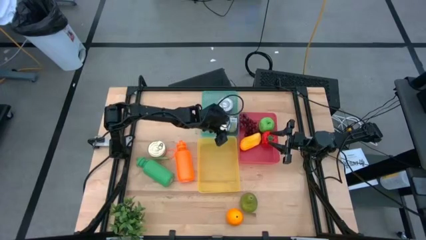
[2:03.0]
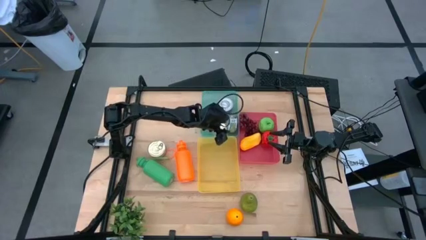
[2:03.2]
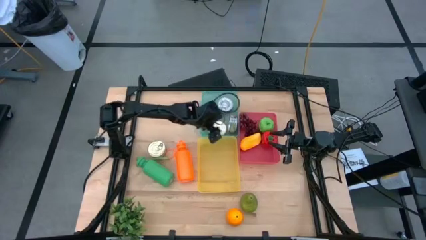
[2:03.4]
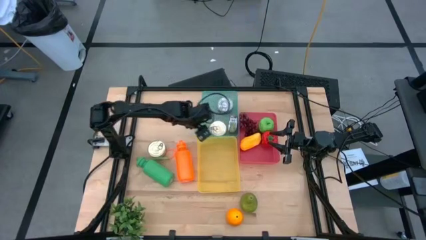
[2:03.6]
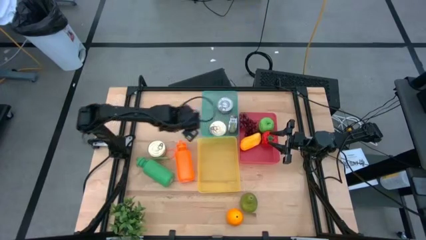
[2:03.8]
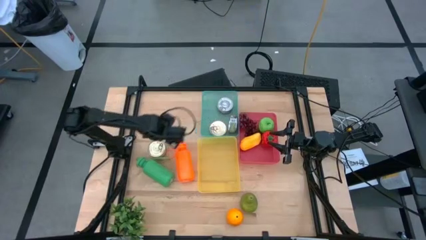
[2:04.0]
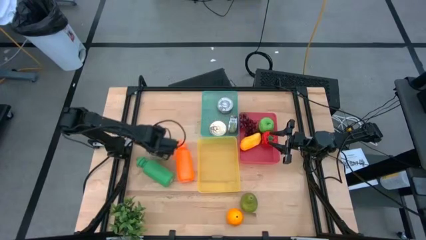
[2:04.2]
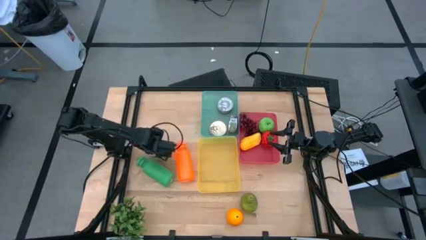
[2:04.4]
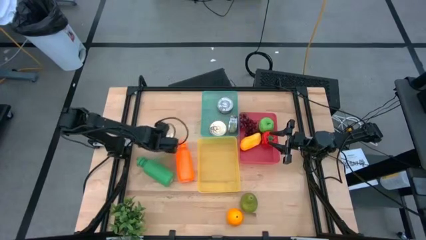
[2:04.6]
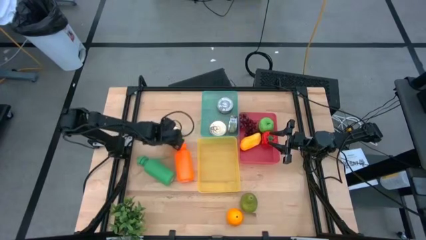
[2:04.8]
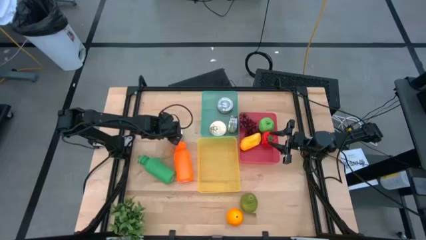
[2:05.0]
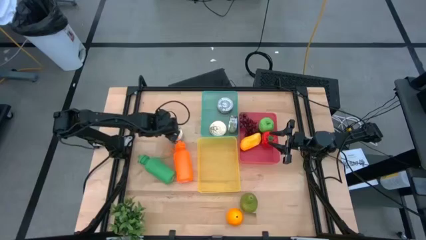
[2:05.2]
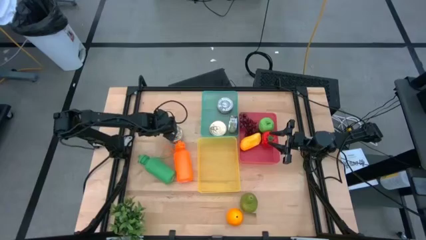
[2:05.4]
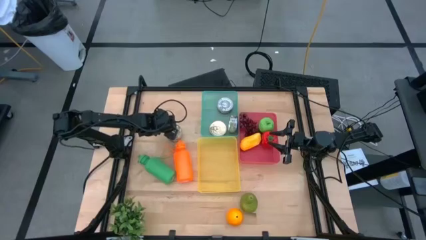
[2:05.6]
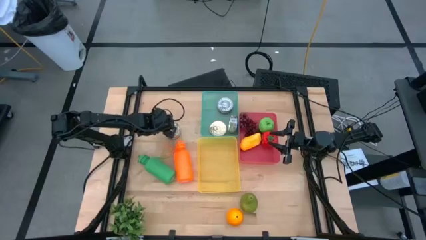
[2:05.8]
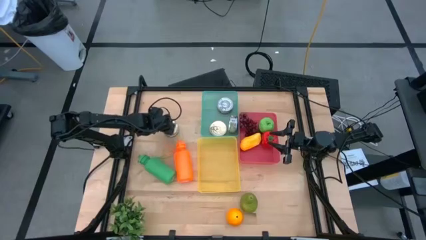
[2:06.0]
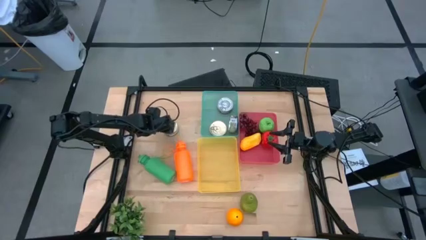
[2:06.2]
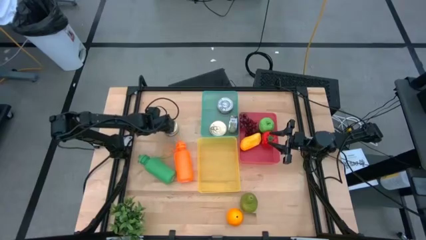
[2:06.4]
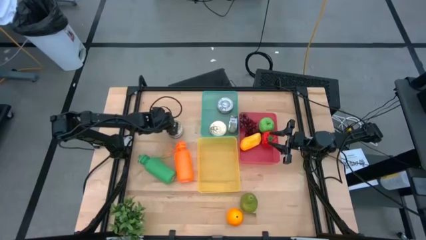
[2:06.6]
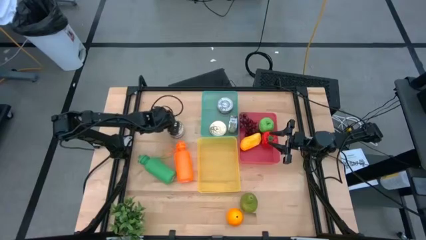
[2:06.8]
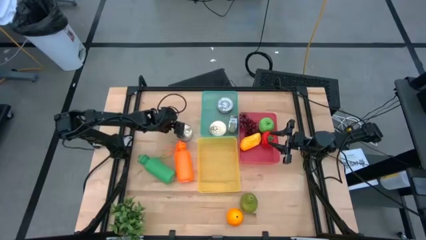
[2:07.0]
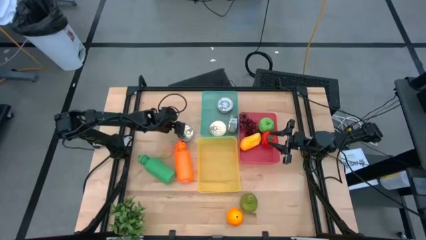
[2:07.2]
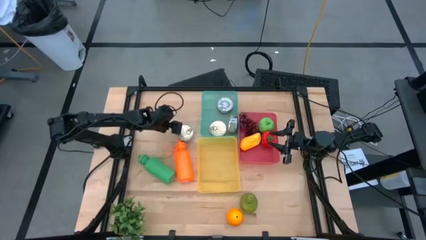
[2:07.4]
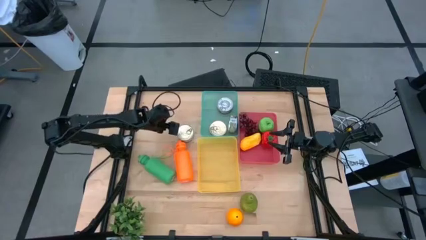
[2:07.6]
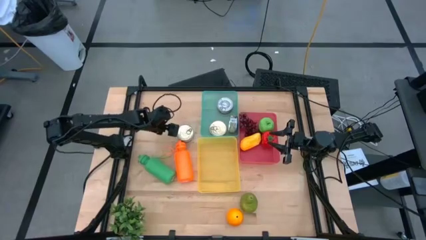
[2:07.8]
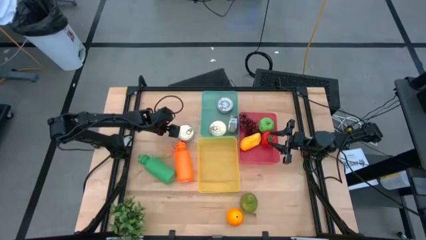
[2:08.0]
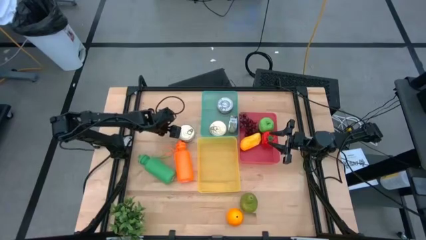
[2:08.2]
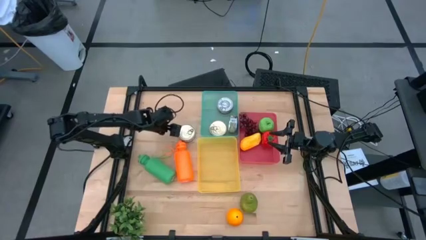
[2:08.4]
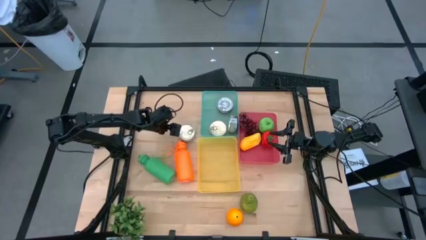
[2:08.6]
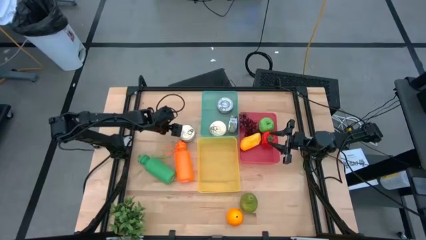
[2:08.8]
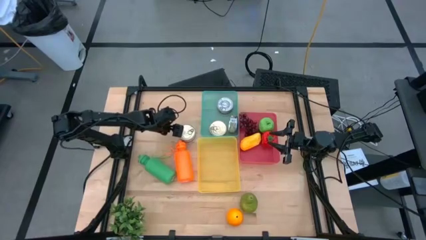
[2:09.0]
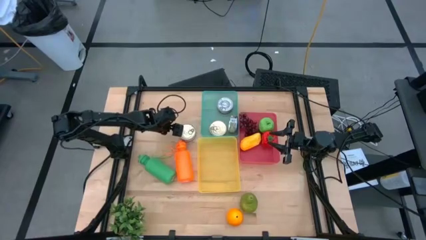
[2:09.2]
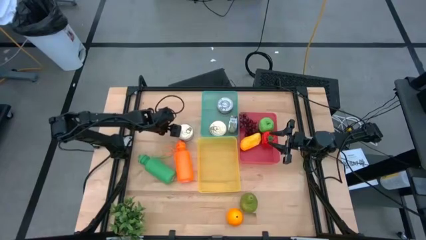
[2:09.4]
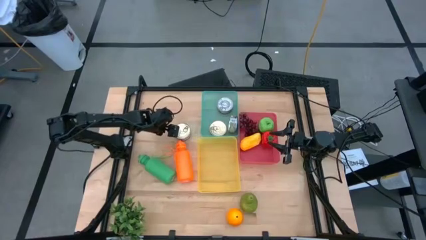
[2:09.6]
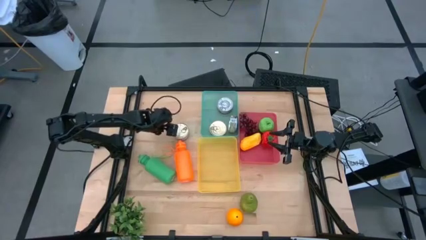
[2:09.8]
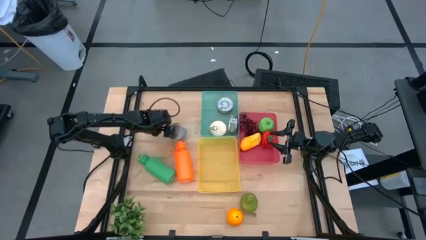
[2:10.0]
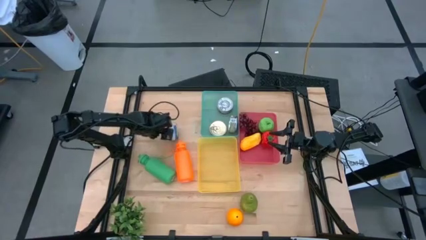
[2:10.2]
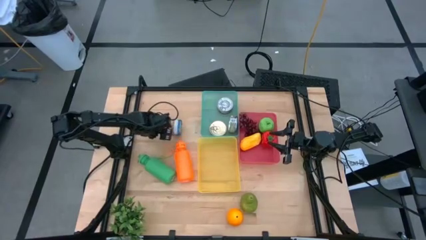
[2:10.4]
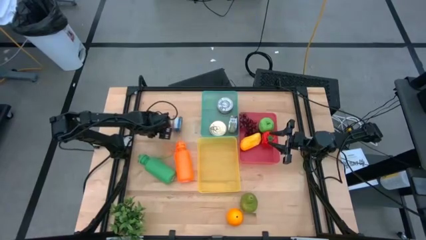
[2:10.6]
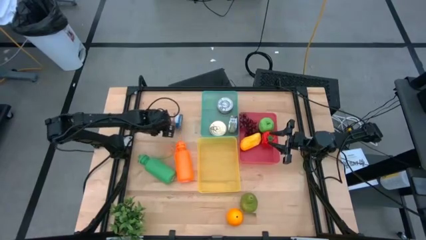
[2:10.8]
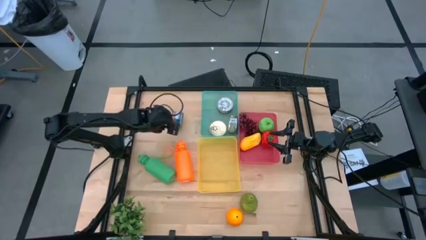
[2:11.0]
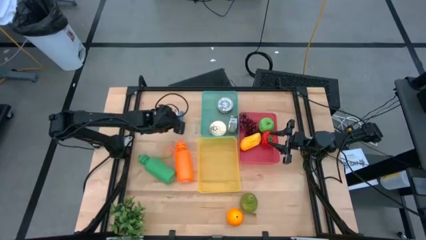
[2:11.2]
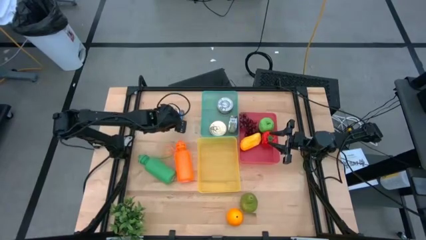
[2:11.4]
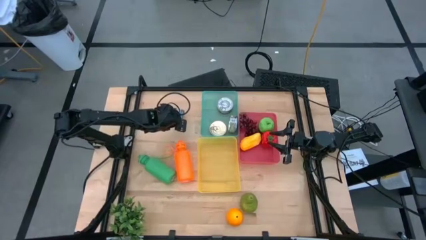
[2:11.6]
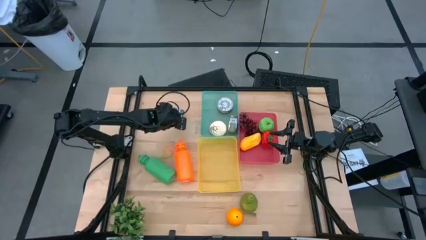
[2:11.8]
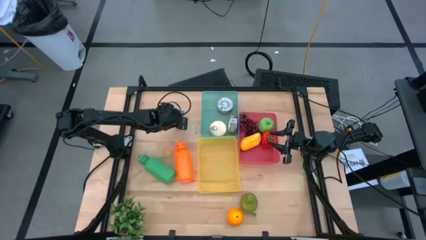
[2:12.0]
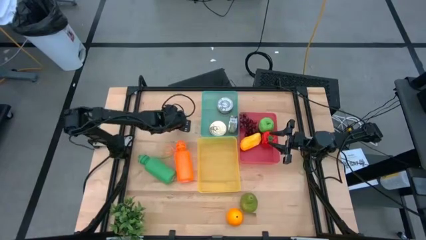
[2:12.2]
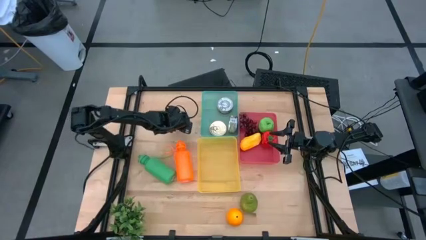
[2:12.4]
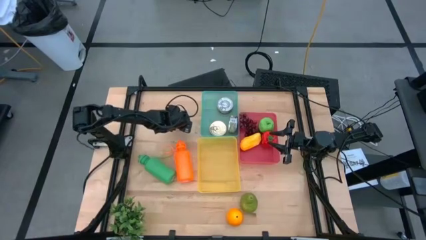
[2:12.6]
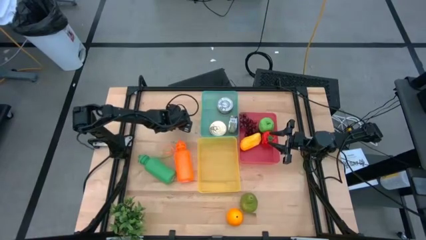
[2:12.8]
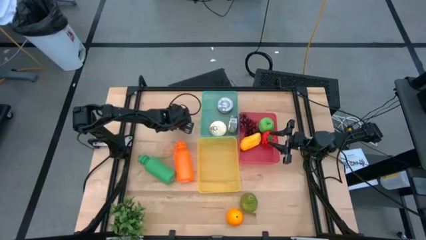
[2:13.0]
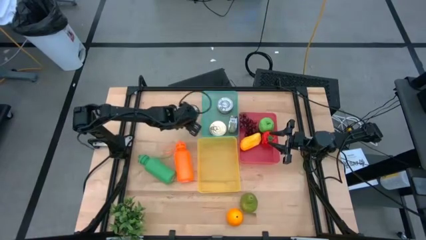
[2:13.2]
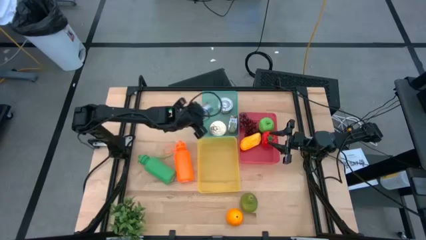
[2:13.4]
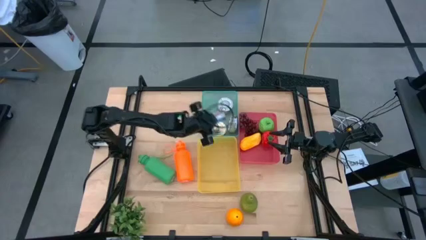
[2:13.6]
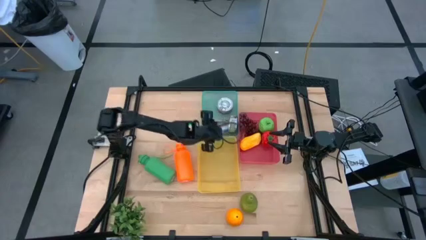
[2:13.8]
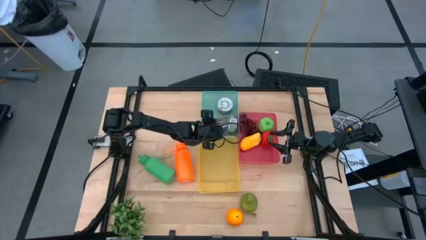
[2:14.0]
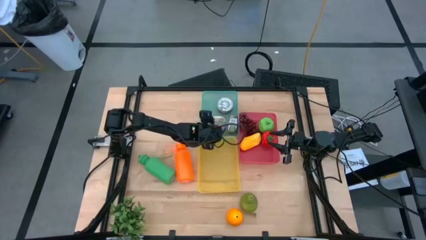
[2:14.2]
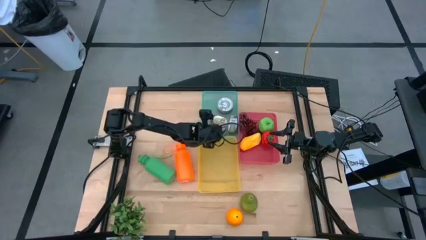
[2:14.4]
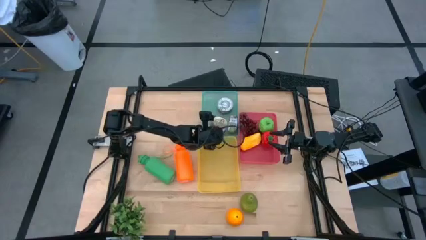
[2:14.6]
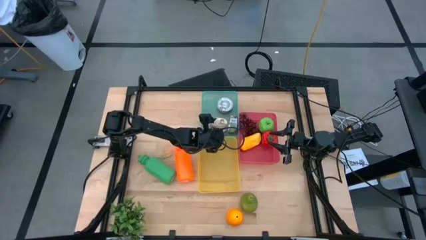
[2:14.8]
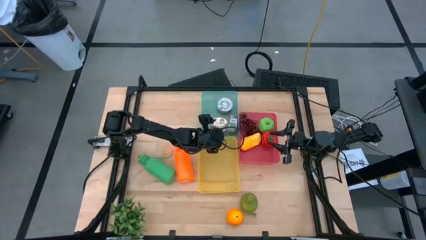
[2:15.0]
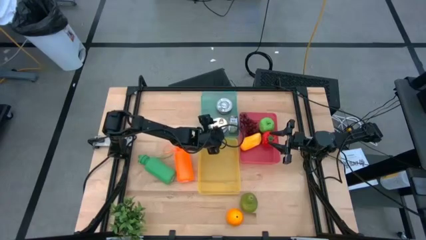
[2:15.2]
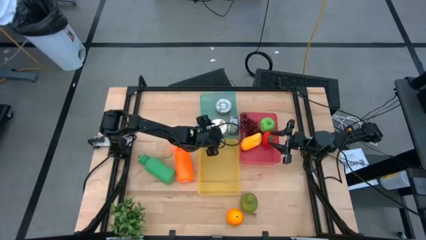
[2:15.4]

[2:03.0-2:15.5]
Task: Pick & Place Food Item
Put the blue pink tuna can into the light blue bin

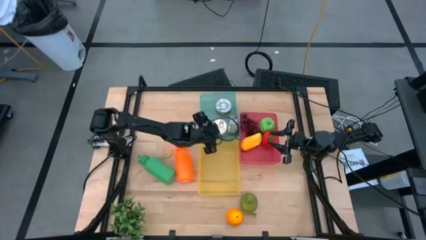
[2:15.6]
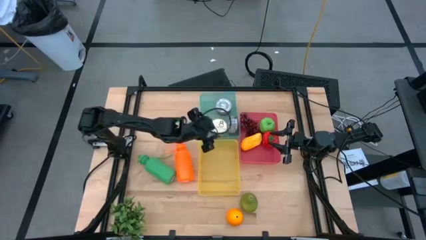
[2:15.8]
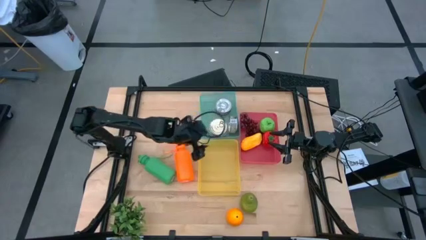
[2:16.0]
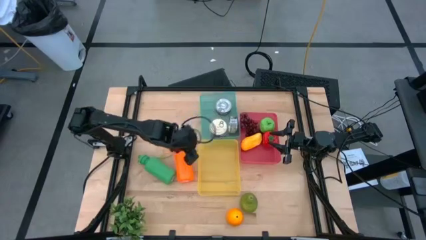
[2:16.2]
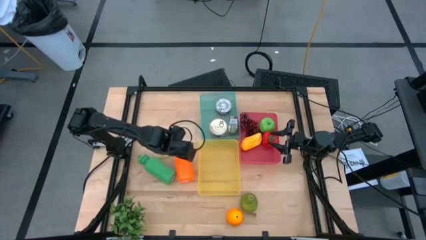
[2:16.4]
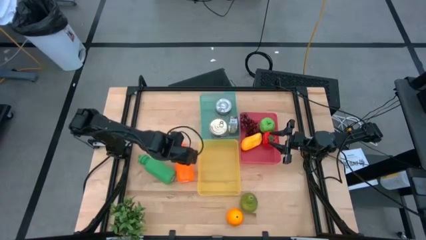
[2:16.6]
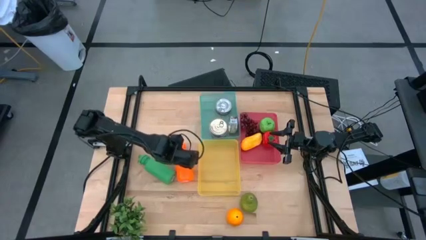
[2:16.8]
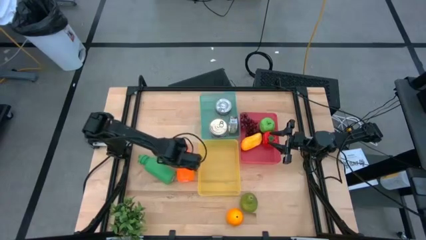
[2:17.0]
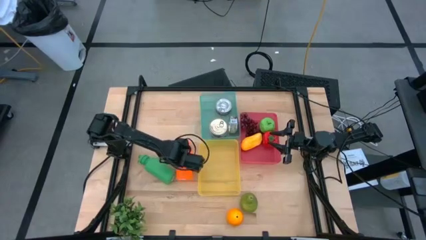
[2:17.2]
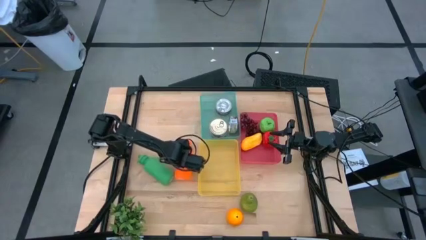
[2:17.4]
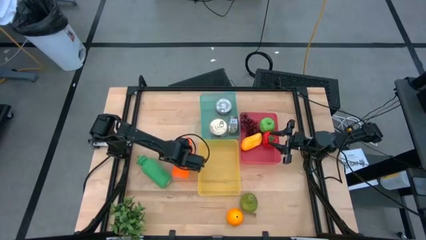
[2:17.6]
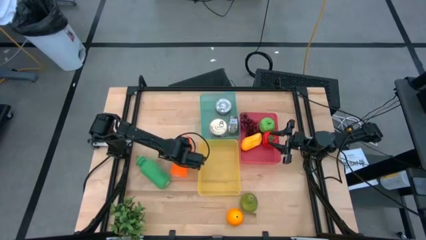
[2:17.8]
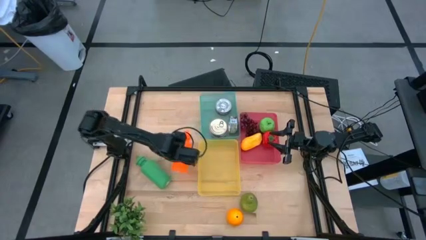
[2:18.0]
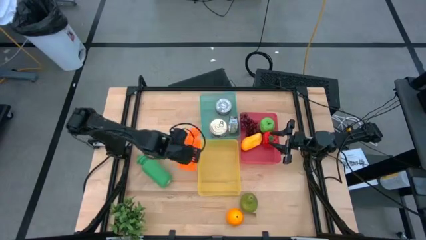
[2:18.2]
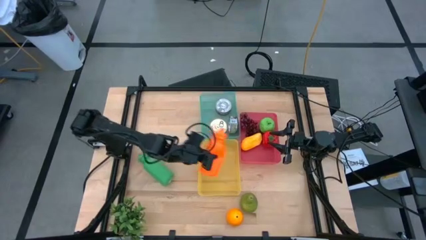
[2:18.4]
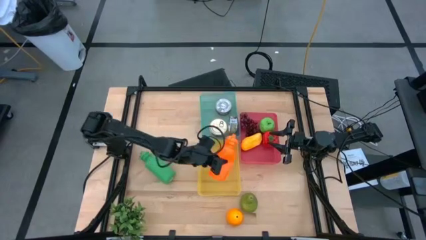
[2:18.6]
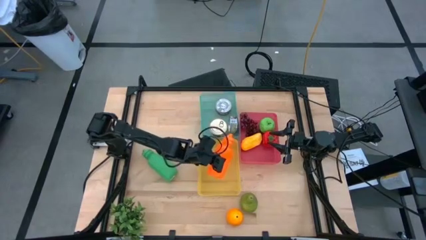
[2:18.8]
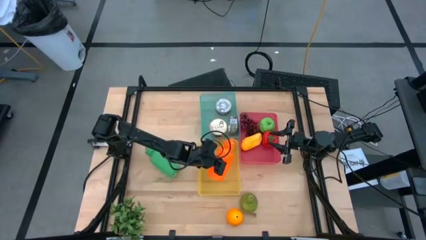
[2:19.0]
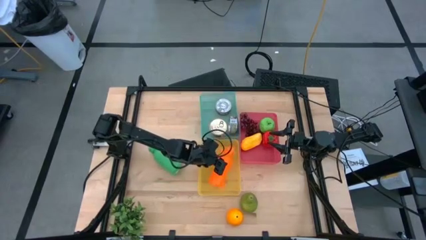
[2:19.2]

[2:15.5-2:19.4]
Put the orange water bottle into the yellow bin
